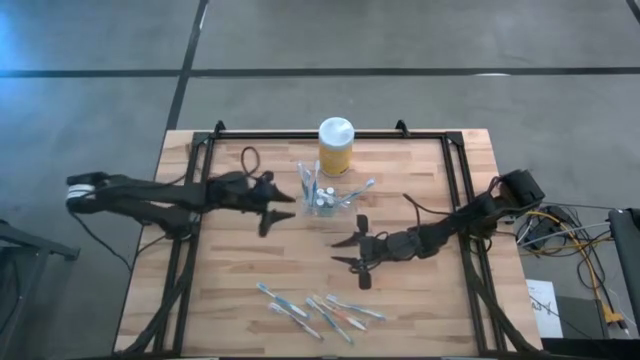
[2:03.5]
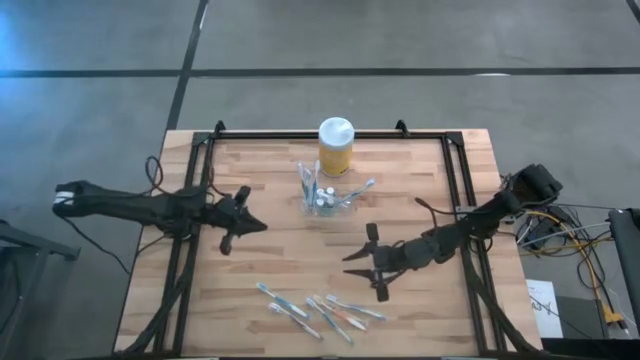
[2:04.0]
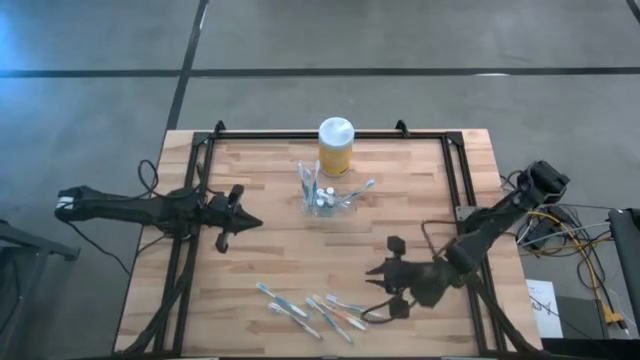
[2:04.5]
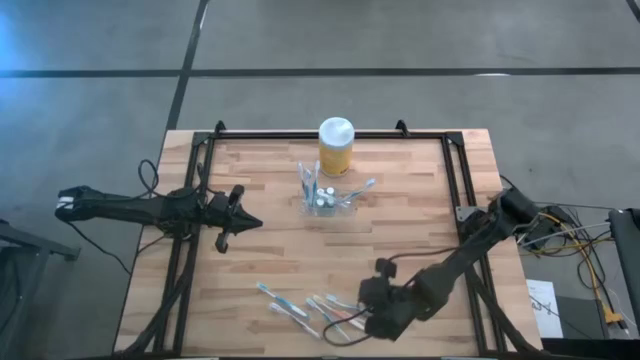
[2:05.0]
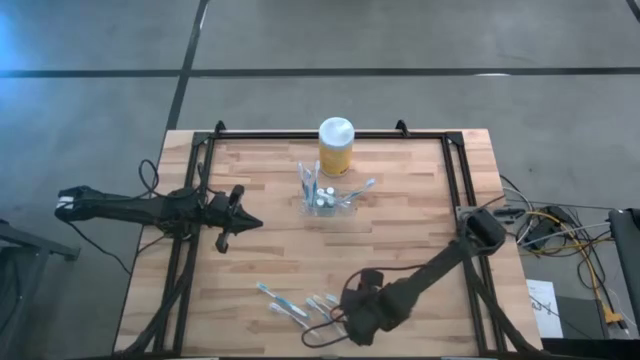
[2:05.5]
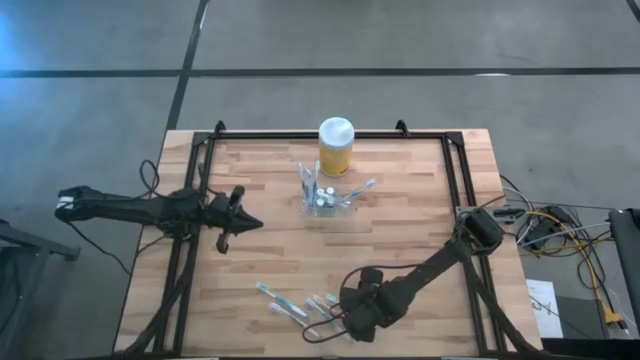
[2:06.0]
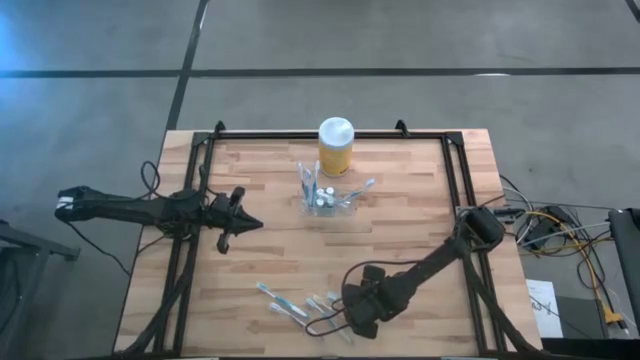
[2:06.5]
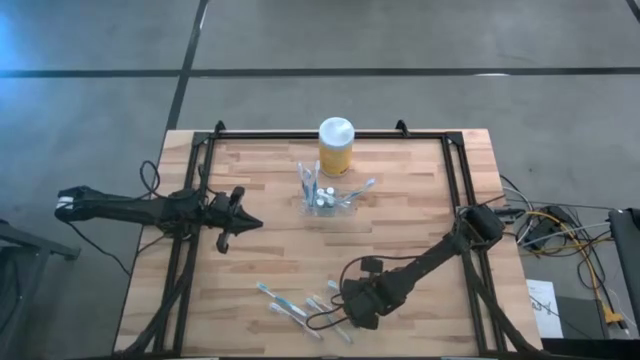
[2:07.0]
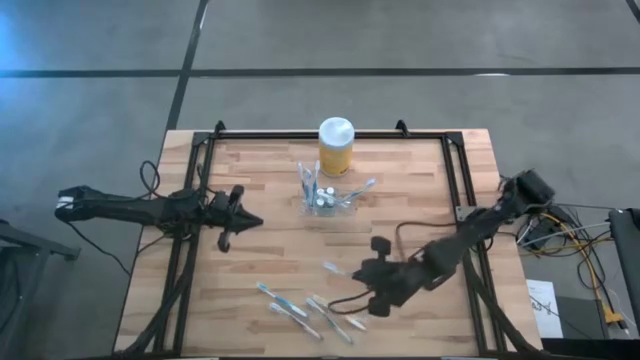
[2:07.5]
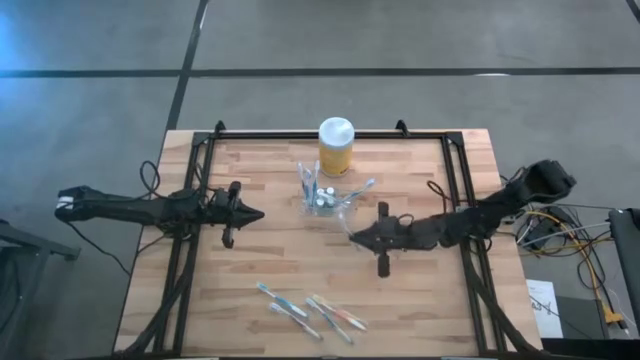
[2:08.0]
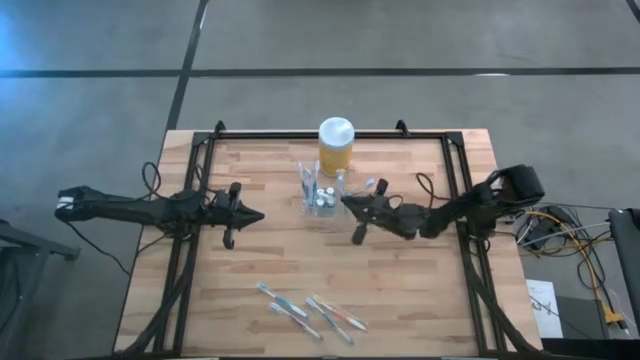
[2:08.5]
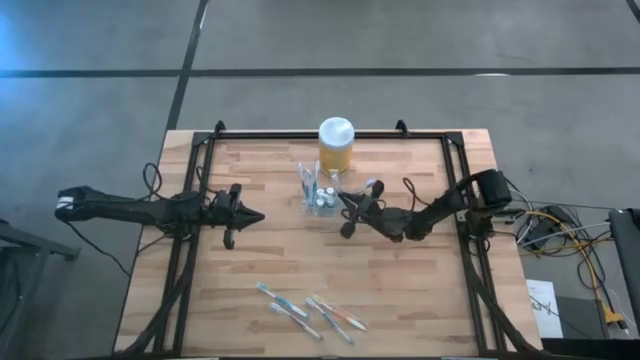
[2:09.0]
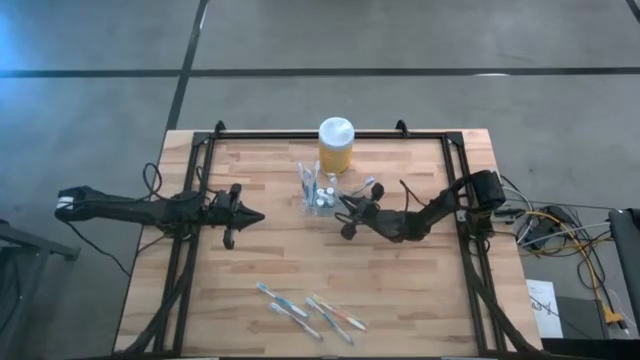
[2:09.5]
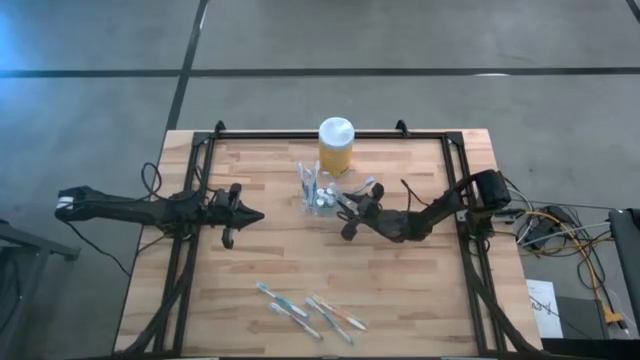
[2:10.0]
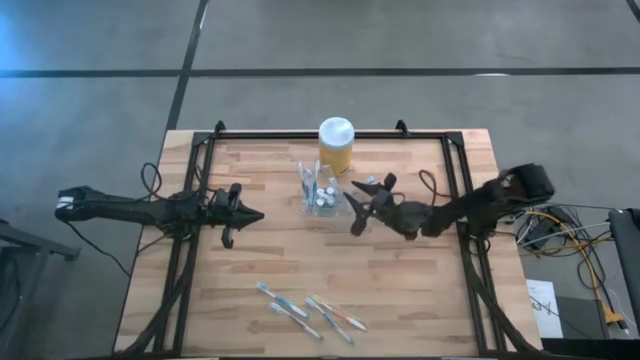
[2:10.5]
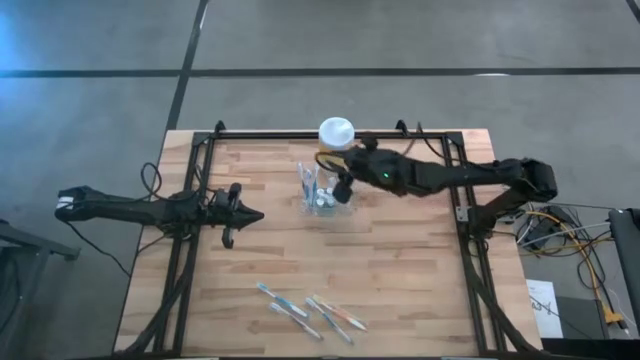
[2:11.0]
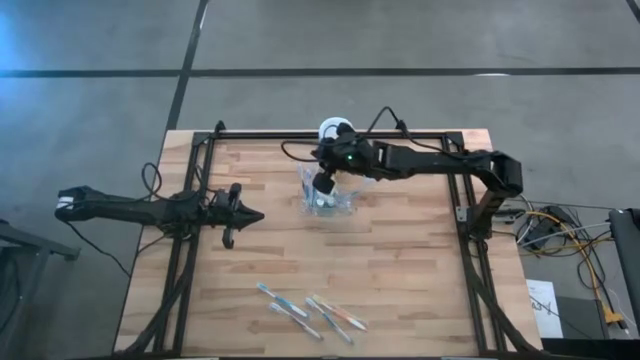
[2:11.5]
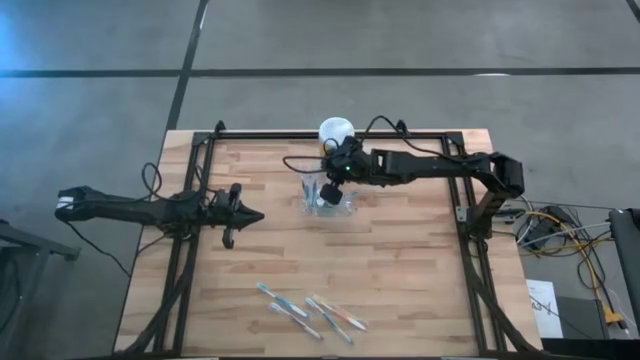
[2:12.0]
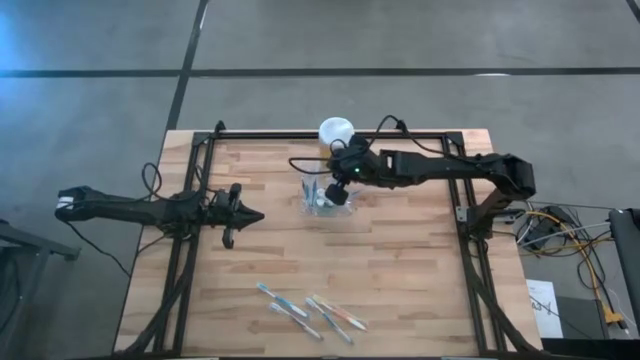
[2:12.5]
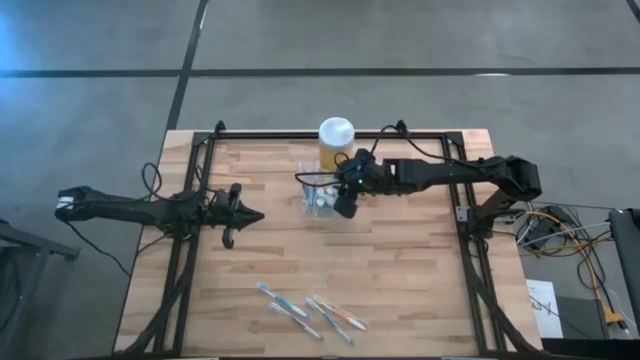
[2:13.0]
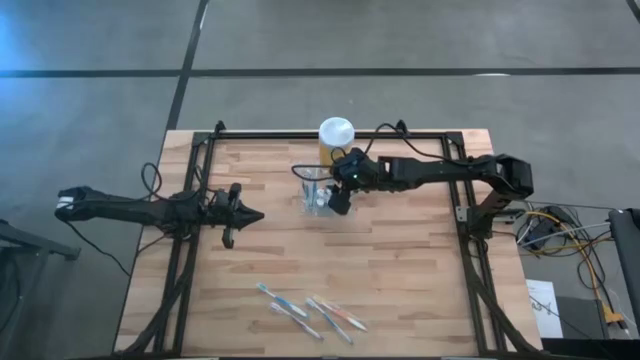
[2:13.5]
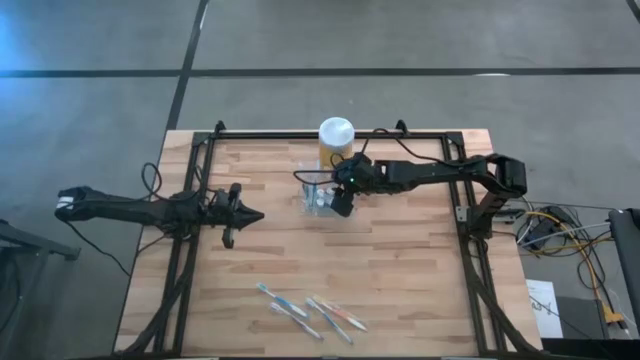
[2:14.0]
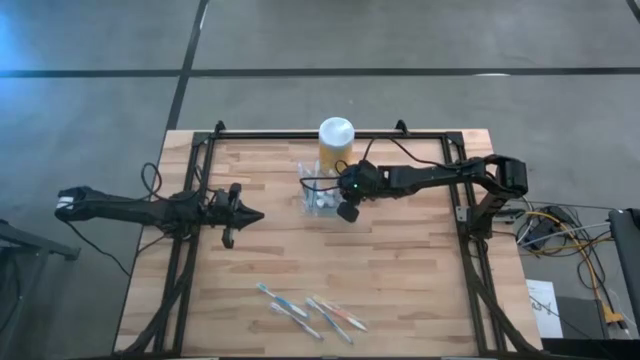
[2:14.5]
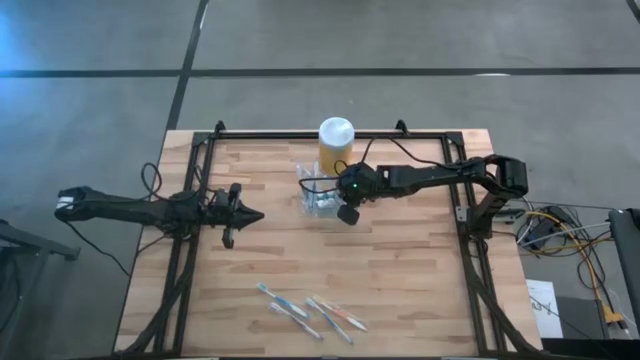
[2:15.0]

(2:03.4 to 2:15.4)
Task: Pick & Place toothbrushing station
Put the blue toothbrush into the transparent organizer

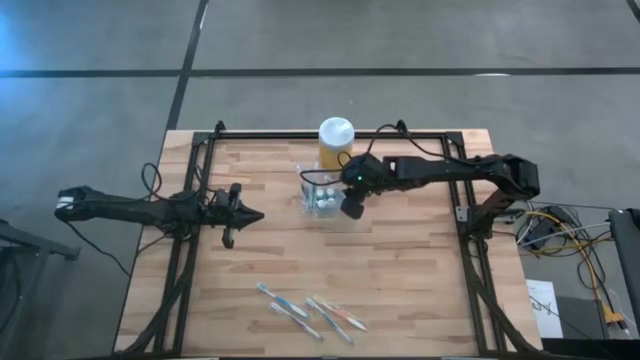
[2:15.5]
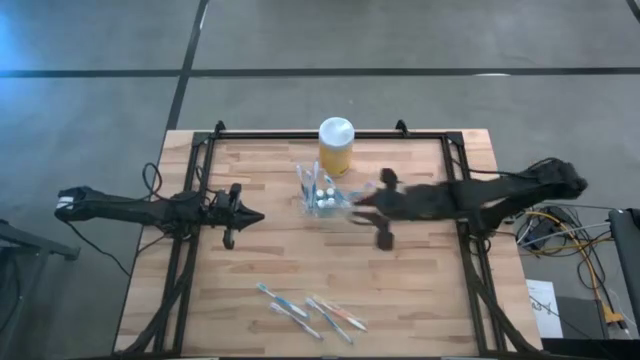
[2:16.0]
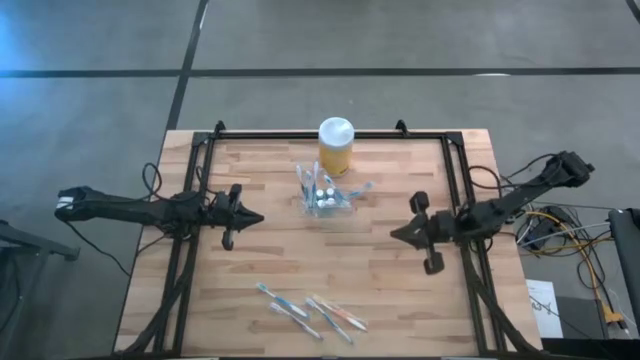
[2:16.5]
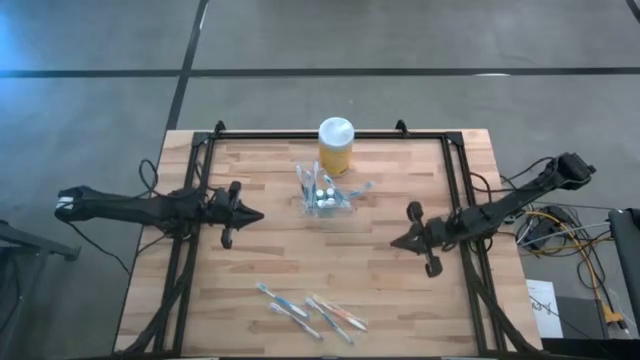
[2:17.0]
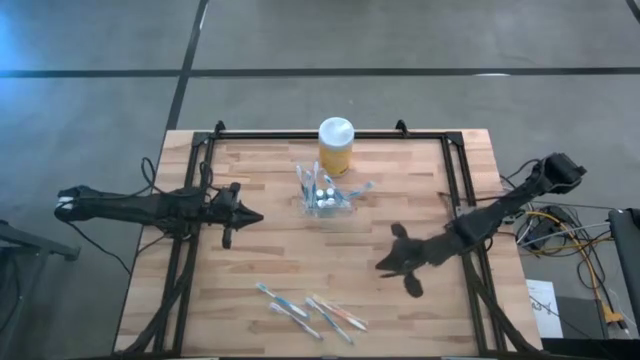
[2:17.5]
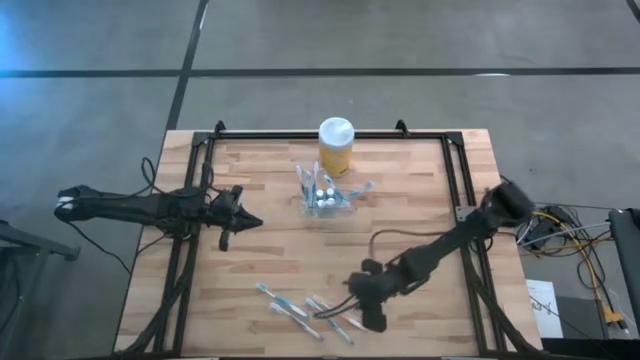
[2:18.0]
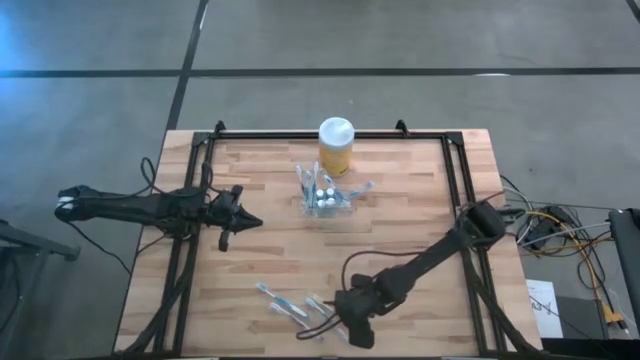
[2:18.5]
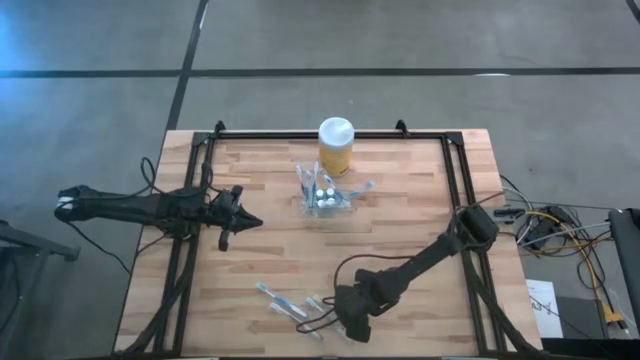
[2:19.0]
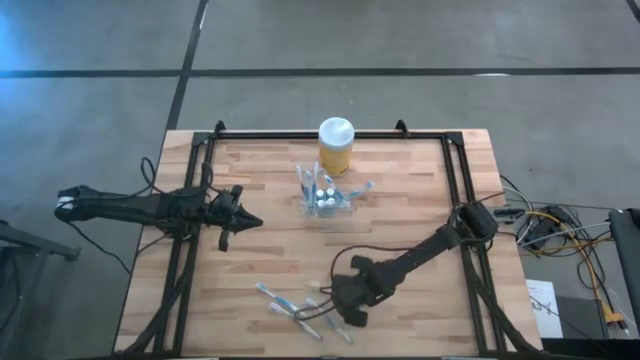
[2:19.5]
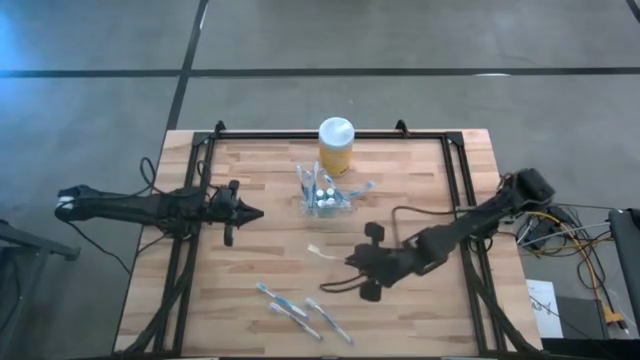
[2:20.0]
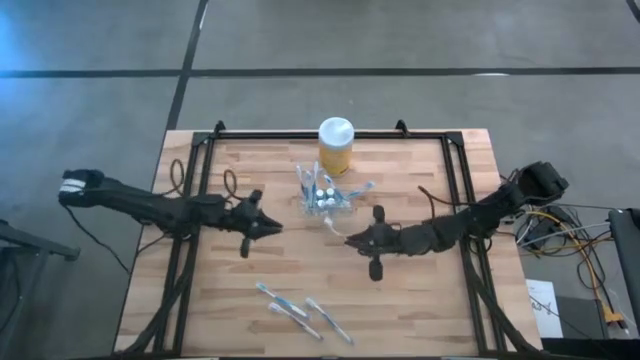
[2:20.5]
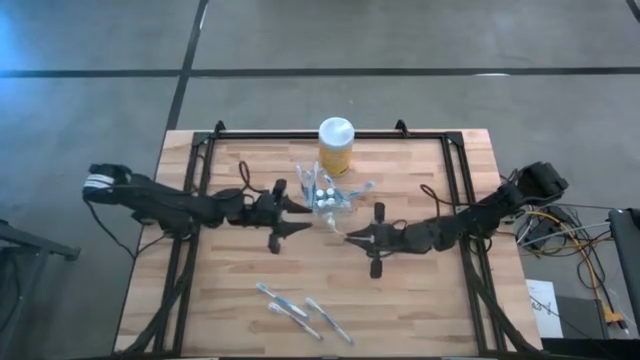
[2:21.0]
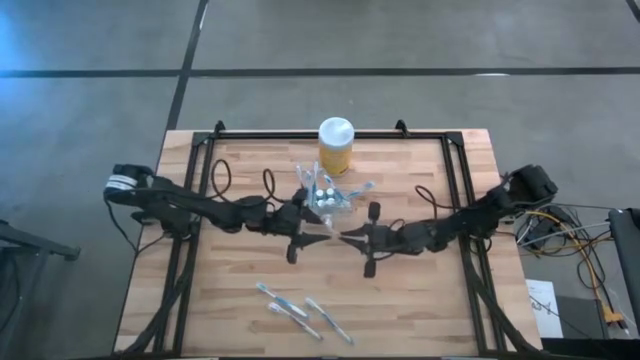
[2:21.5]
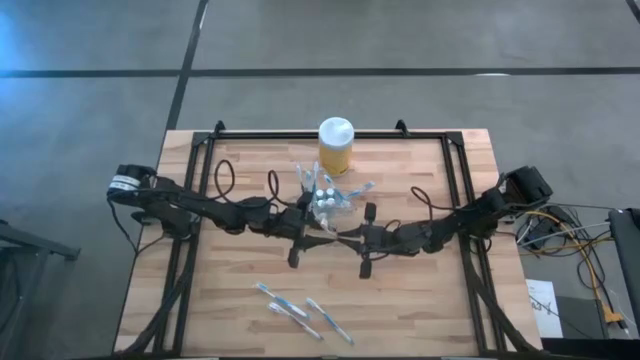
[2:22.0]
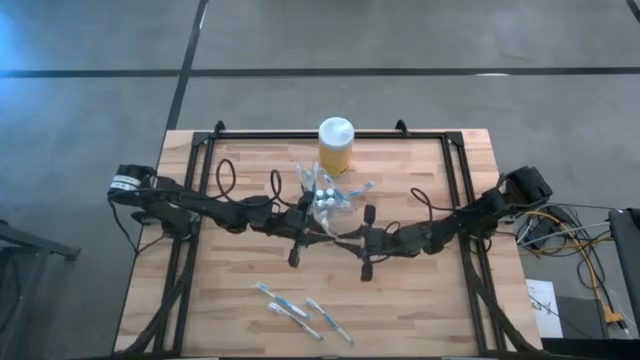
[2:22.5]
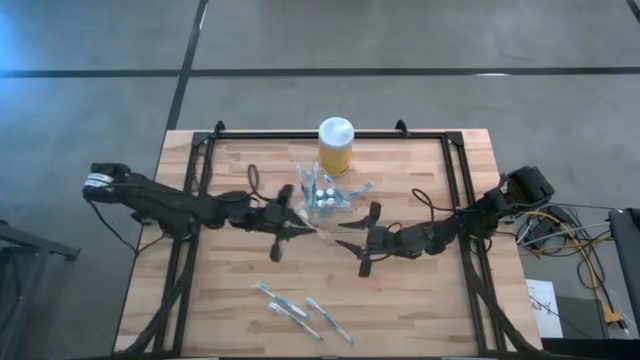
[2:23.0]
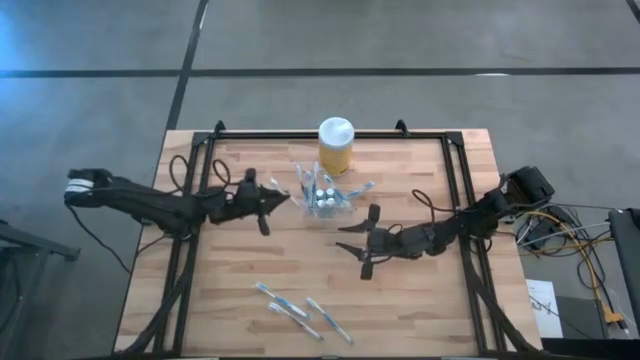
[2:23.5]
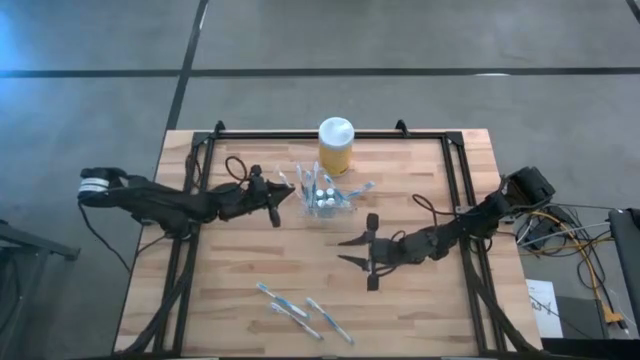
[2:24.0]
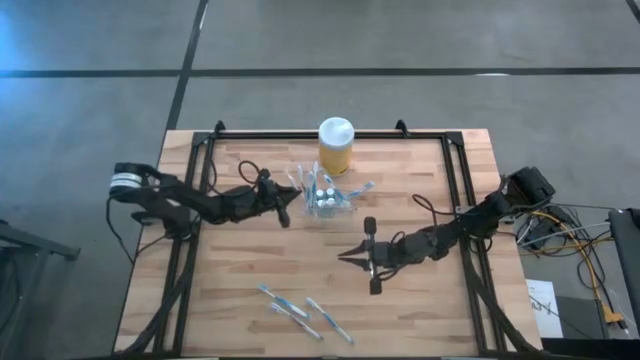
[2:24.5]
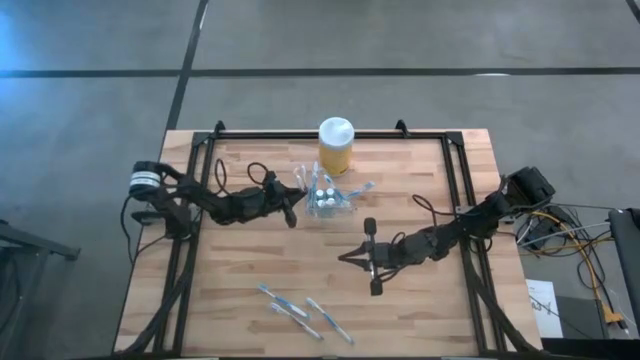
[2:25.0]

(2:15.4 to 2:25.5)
Put the orange toothbrush into the transparent organizer
